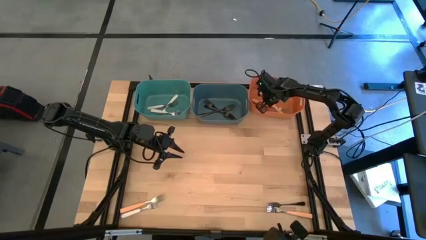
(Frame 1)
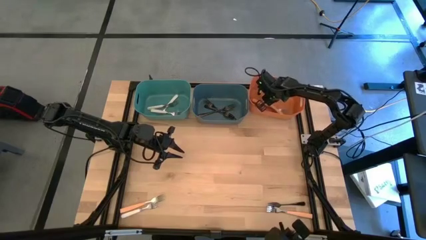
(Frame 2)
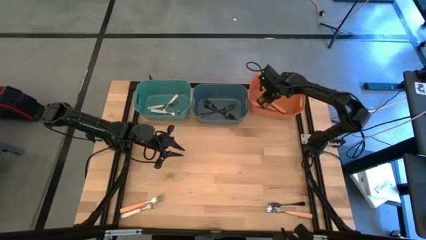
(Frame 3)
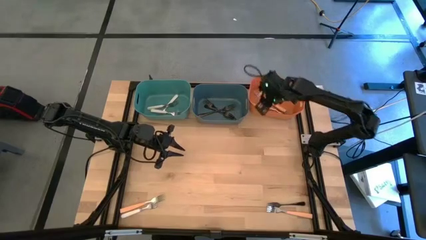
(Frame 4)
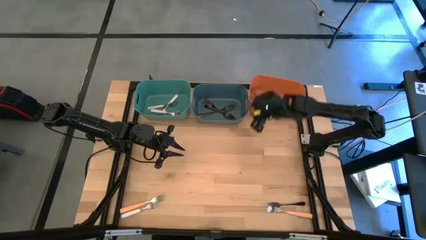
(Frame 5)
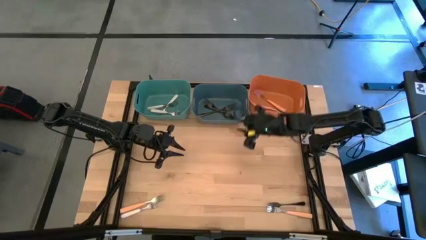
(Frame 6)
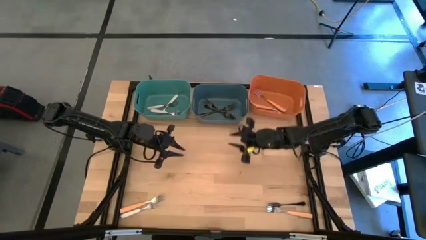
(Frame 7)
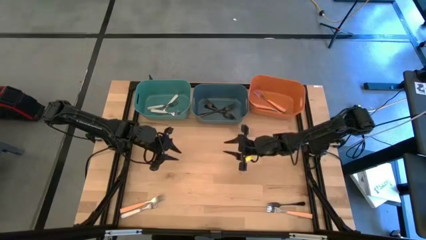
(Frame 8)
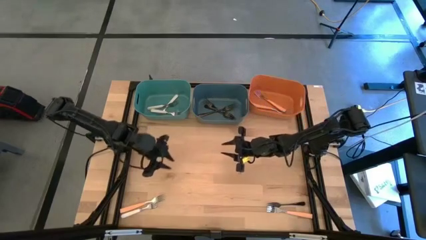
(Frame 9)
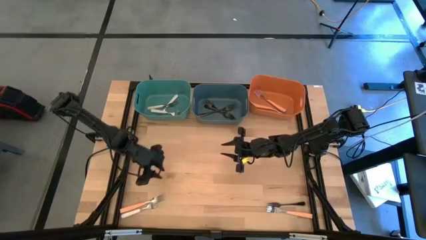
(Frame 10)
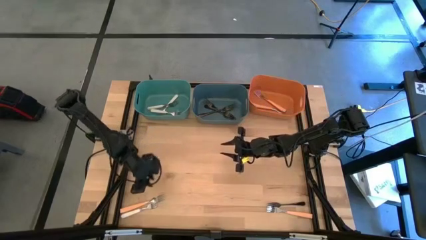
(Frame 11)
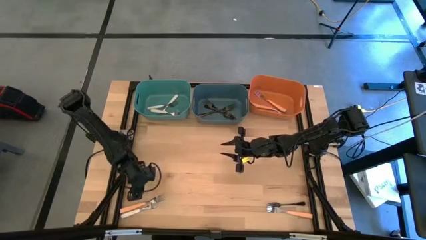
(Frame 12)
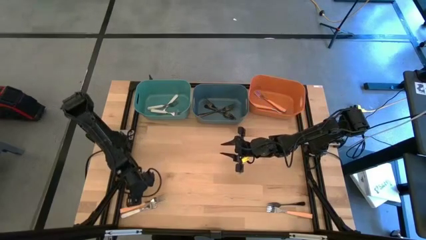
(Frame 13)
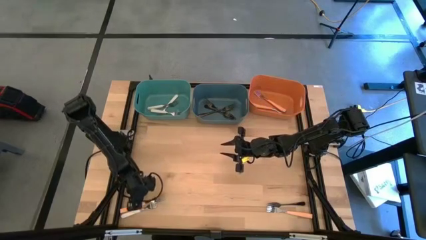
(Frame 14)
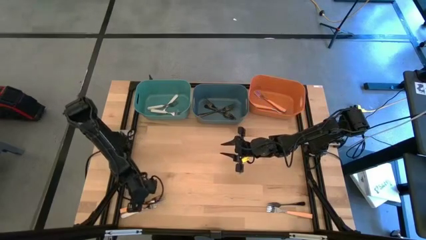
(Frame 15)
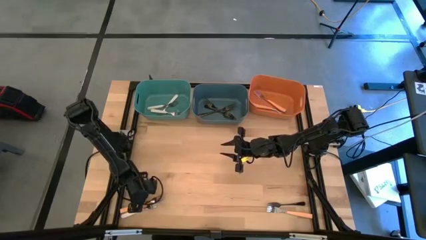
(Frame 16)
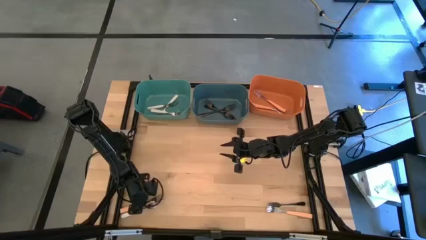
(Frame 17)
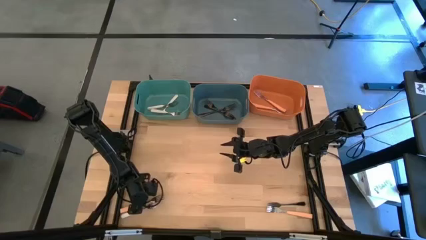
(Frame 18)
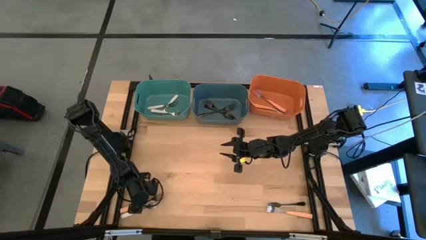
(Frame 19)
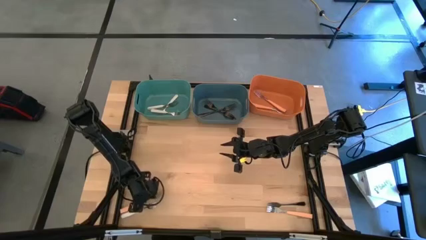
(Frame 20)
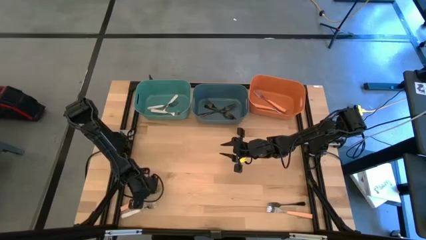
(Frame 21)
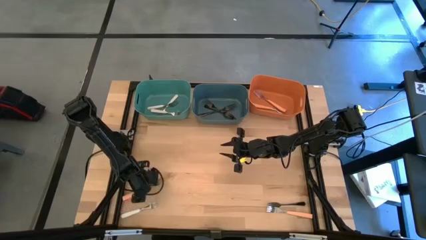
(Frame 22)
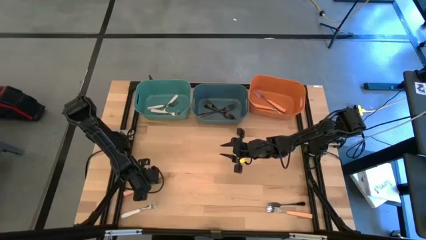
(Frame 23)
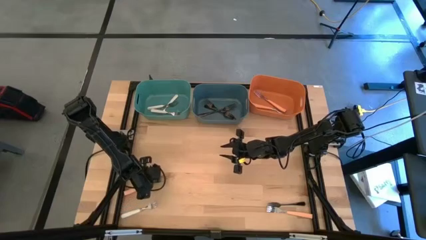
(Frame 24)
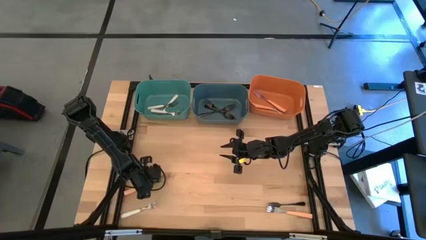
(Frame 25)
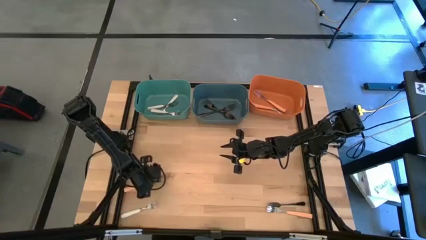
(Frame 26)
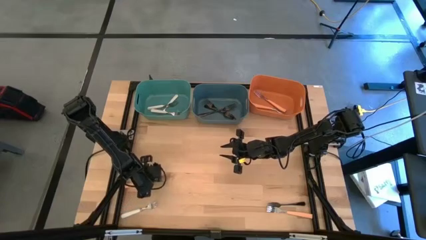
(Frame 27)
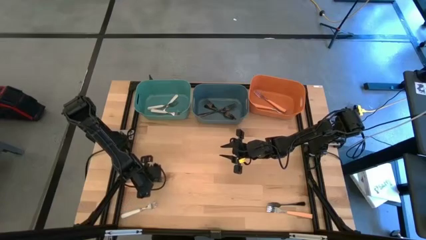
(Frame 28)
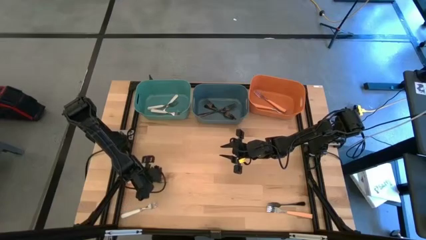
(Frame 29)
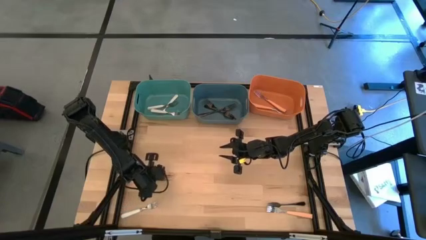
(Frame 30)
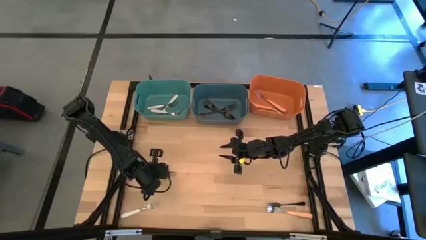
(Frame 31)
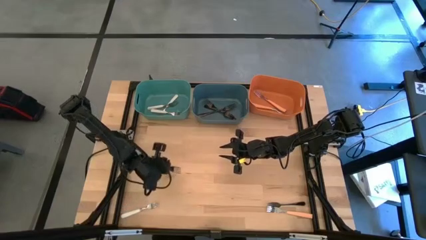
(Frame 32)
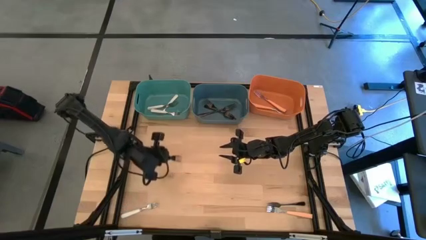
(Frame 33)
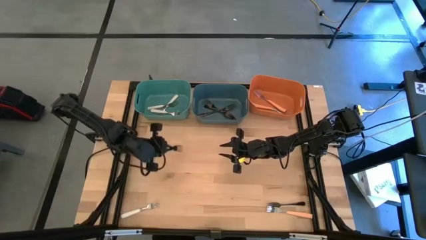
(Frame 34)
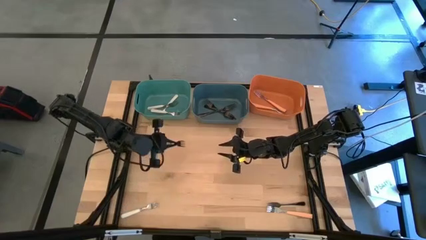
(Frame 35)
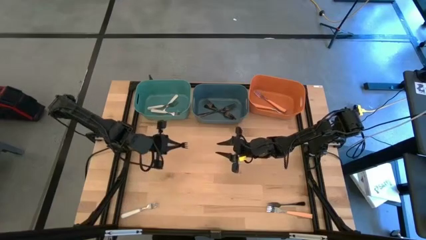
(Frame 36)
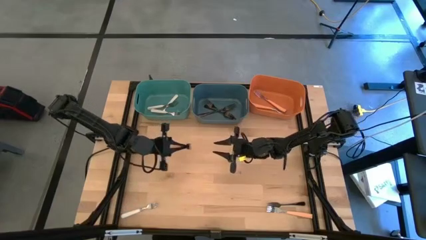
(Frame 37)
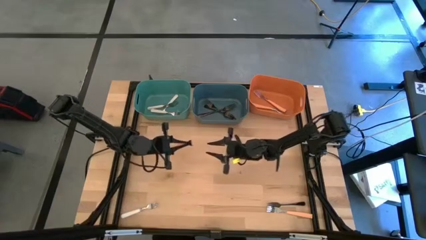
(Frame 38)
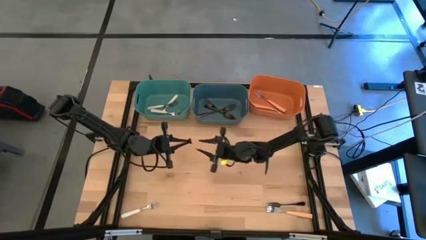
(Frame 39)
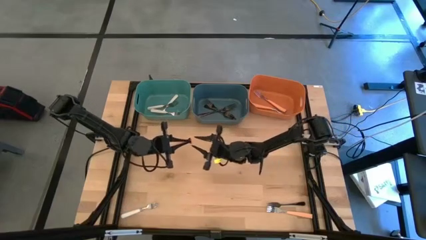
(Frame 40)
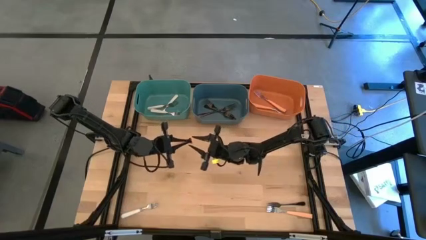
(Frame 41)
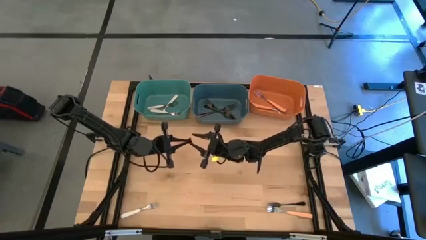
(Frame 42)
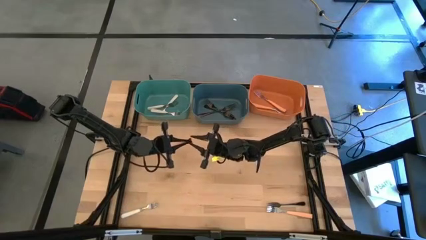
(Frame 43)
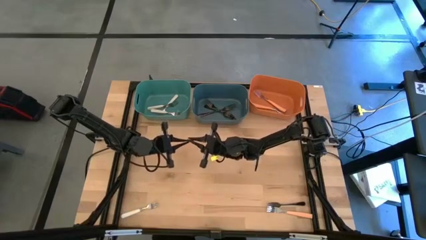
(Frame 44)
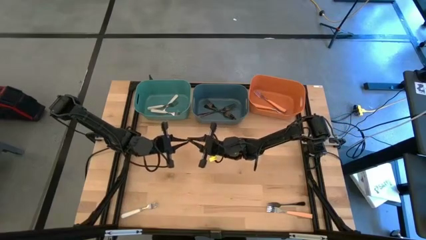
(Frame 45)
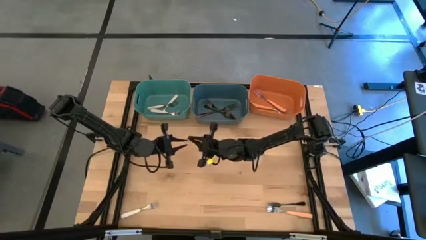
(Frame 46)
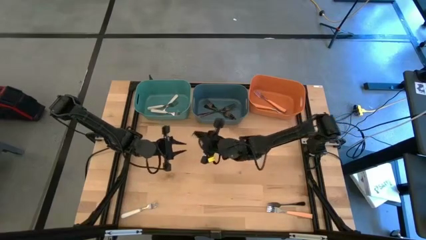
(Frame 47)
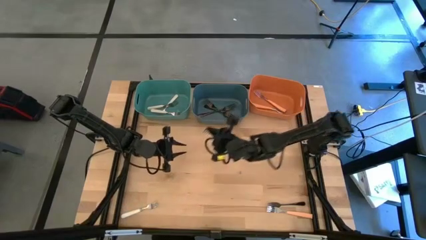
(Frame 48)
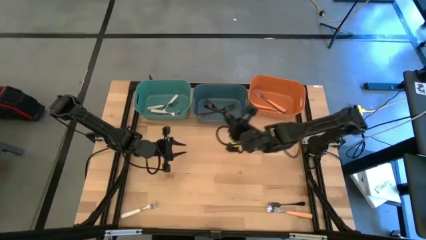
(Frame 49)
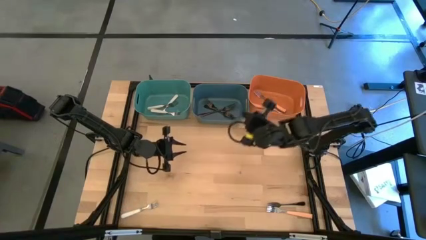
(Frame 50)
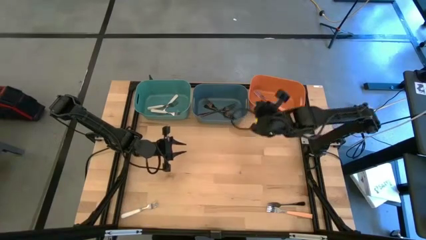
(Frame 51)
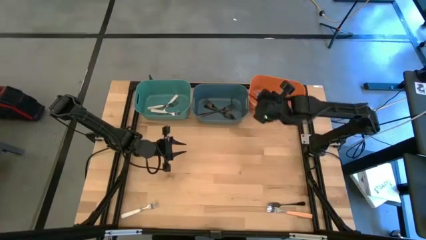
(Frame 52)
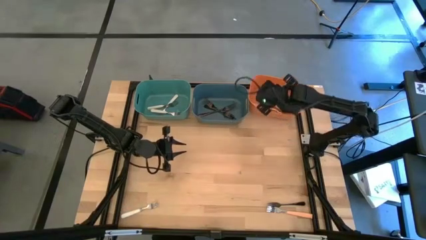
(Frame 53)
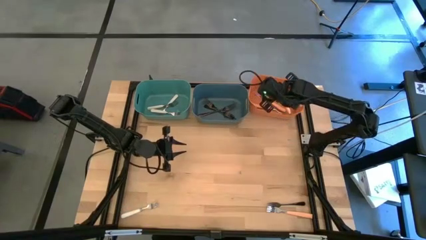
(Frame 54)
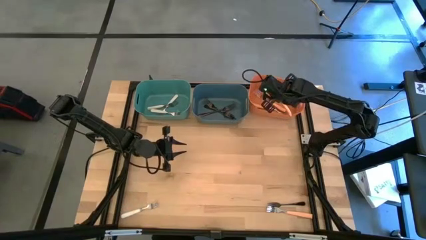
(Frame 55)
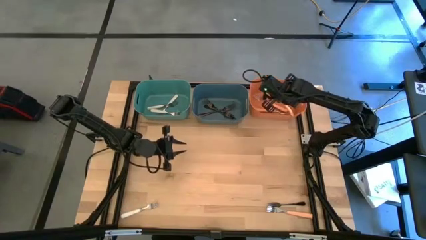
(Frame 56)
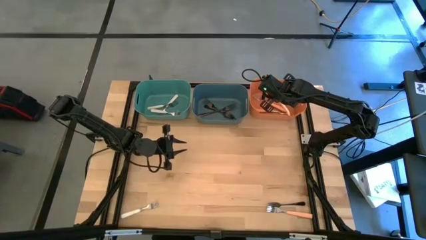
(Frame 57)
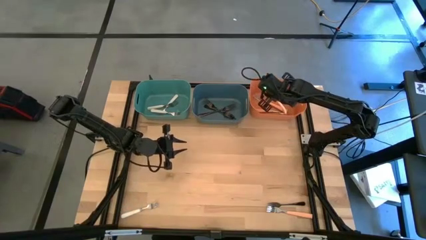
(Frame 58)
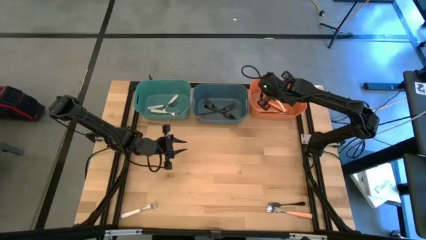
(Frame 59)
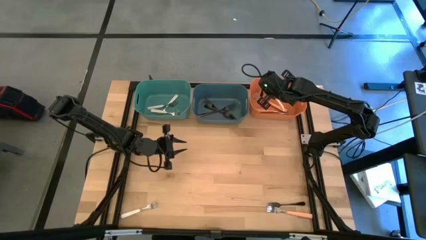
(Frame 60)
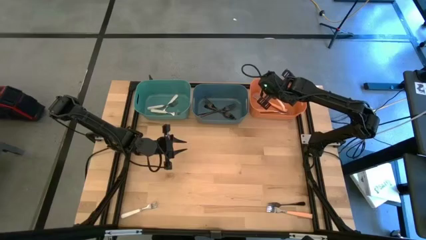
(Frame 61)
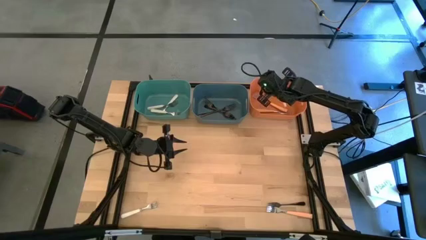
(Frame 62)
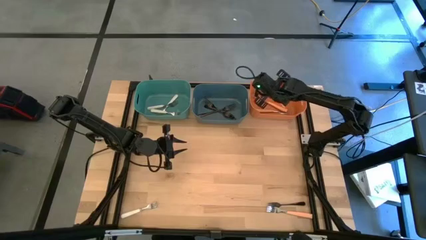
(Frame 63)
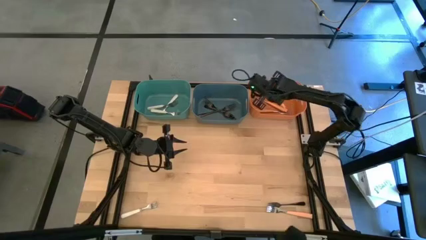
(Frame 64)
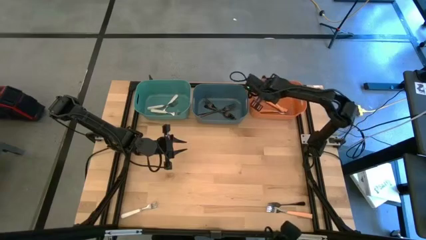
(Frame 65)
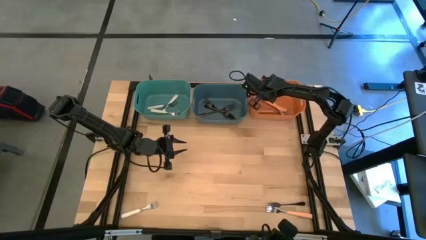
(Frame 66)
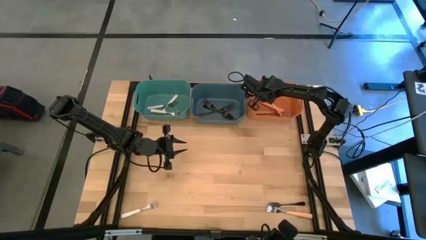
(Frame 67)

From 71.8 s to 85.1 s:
Task: Sort silverware by color (type)
Put the left orange fork into the orange bin
